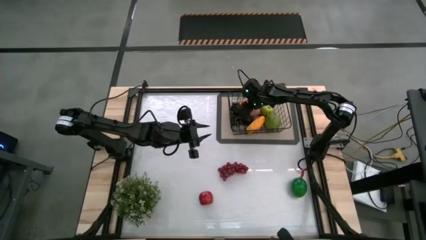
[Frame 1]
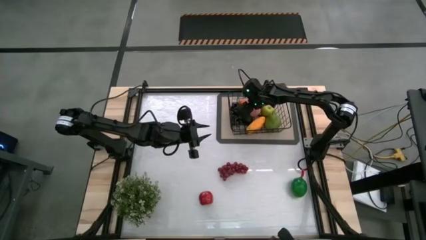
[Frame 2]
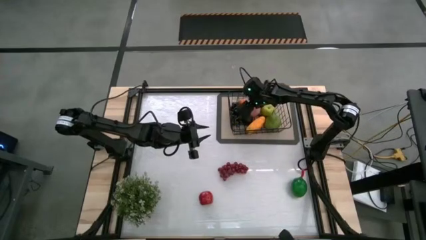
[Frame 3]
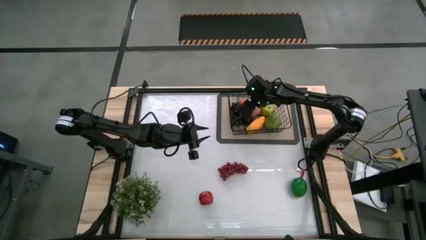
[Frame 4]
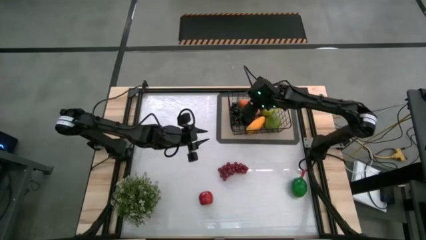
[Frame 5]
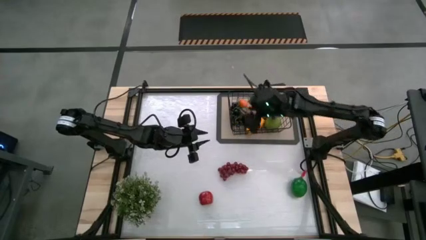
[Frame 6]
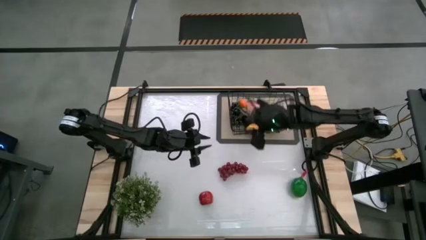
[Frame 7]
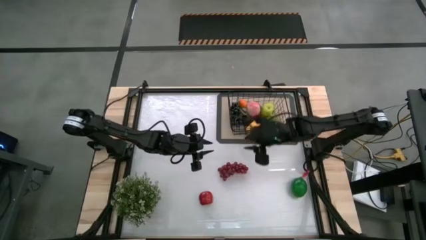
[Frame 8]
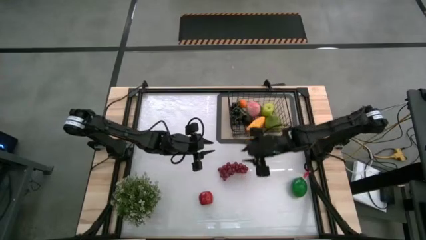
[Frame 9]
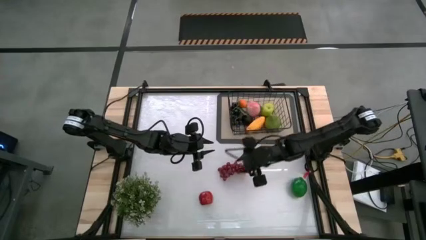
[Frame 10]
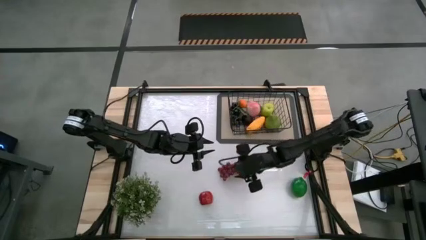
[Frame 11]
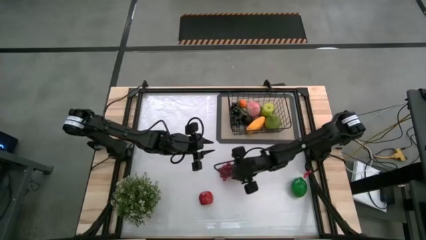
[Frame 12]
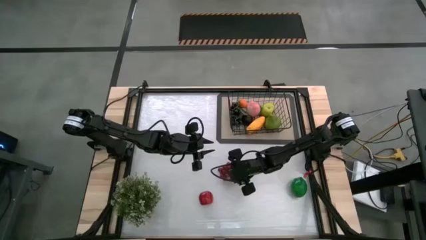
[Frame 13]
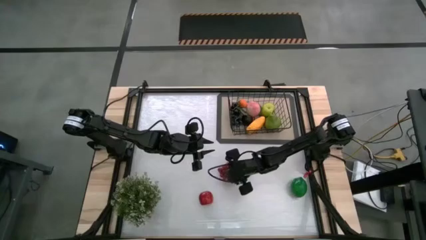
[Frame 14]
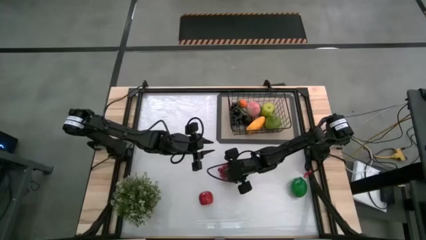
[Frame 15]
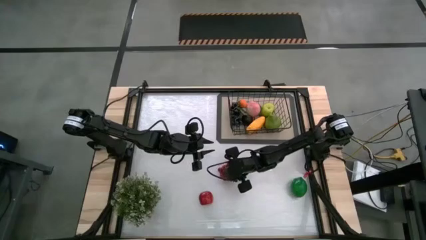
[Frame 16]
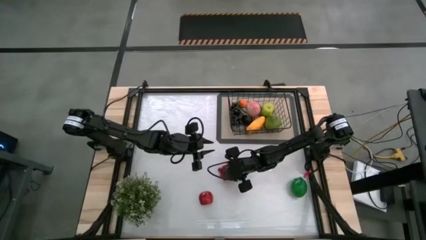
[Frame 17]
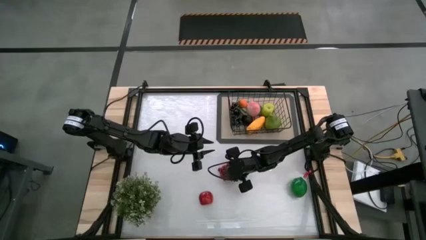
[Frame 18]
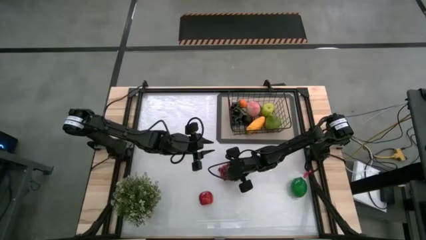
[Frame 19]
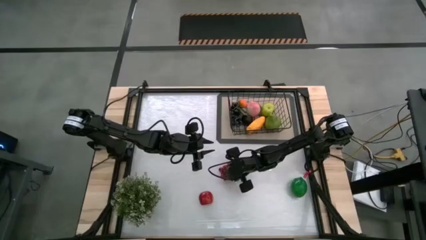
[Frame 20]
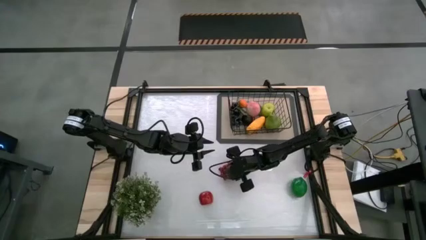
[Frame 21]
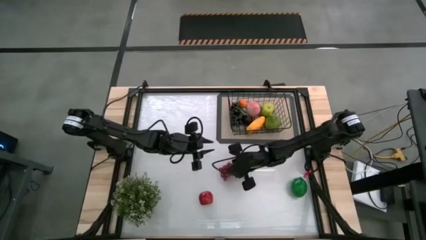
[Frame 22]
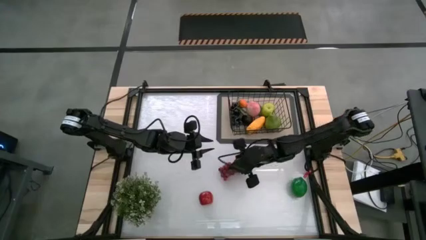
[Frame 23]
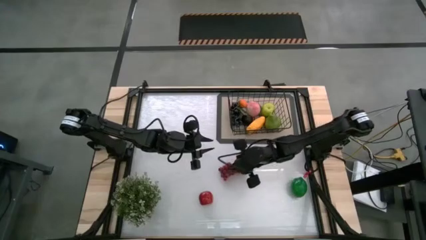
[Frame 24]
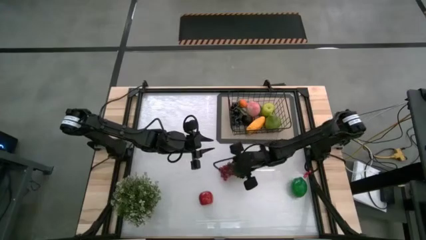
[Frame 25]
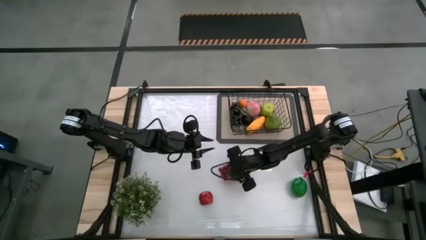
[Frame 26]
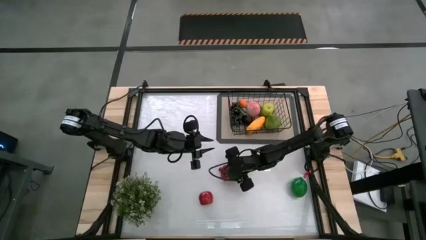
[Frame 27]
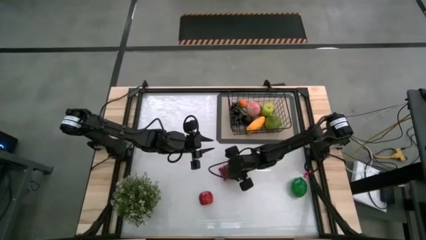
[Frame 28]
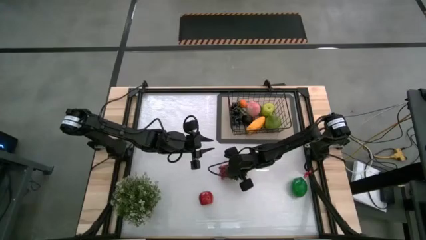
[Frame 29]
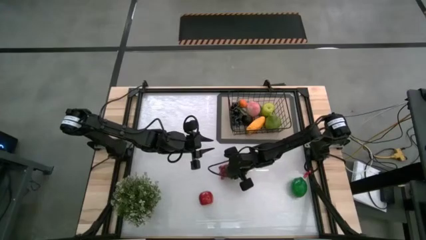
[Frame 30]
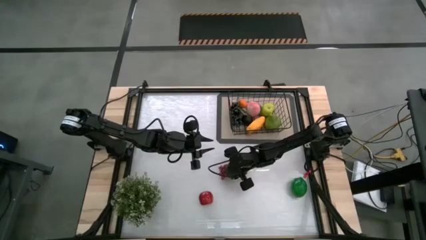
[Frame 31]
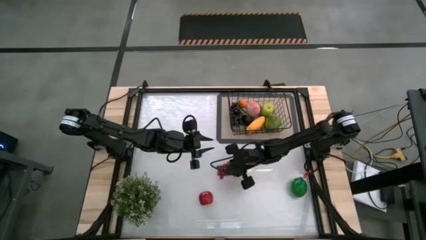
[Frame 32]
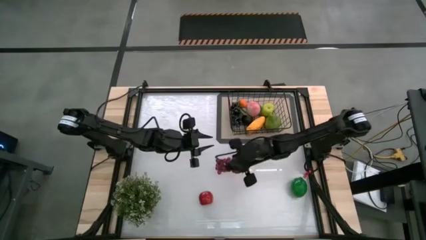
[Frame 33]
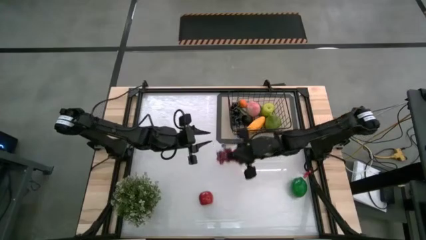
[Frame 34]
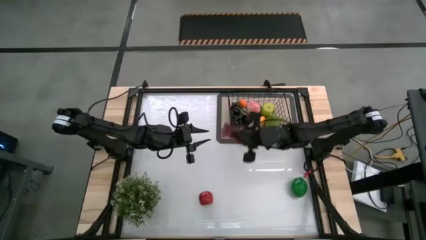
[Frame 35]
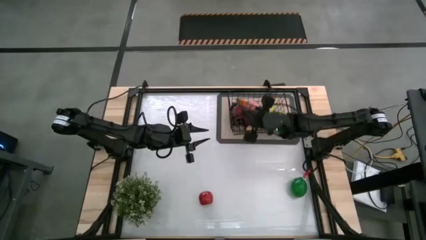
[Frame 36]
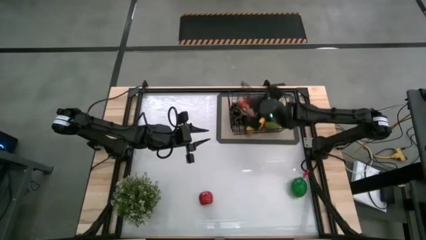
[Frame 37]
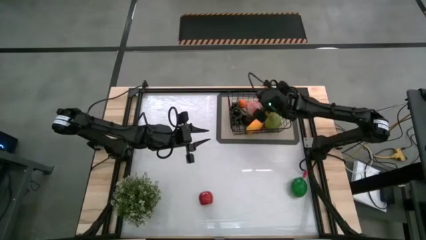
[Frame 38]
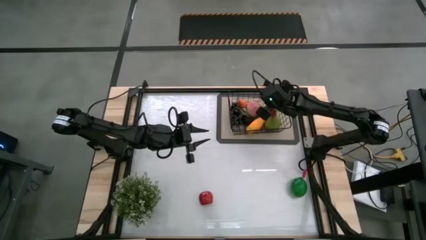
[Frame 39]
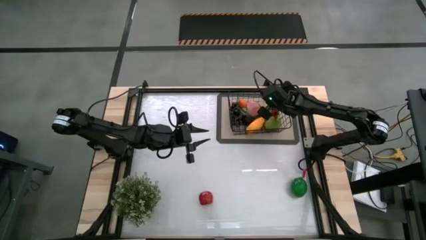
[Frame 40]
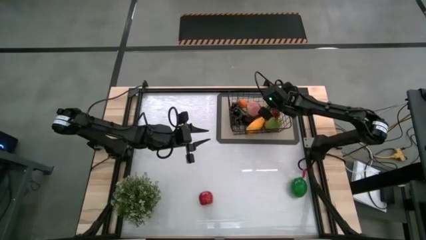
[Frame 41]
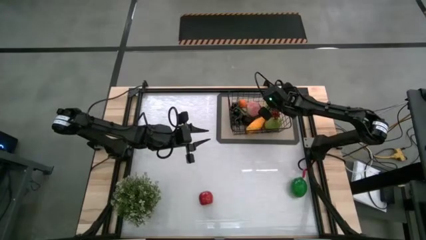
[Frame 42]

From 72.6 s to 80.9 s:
Task: Build produce basket
Put the red grapes into the black basket

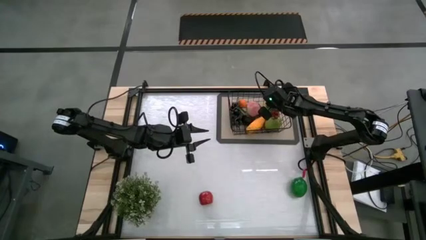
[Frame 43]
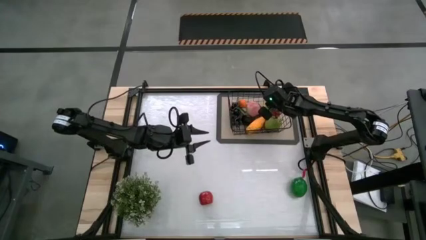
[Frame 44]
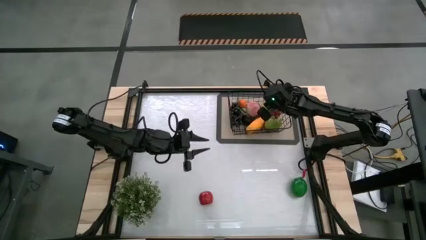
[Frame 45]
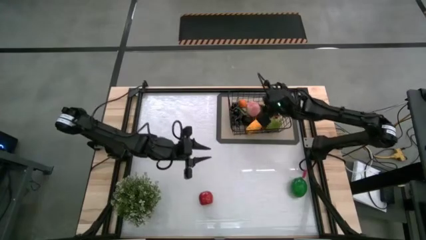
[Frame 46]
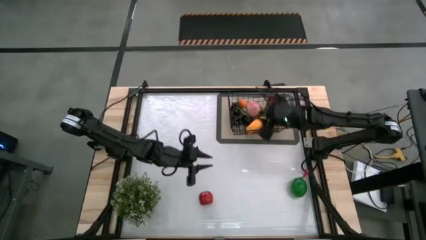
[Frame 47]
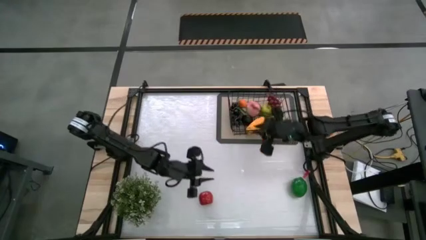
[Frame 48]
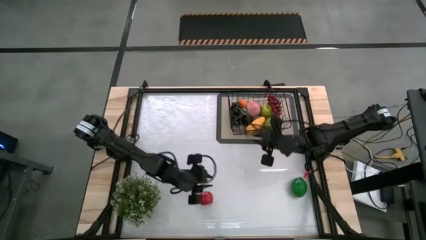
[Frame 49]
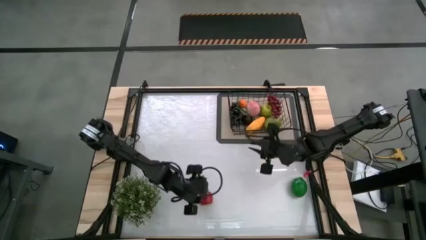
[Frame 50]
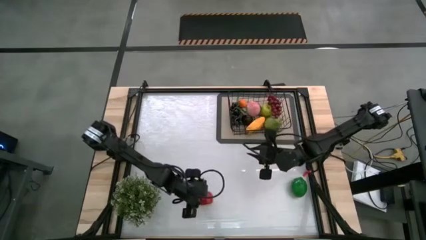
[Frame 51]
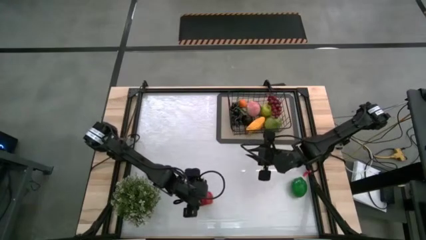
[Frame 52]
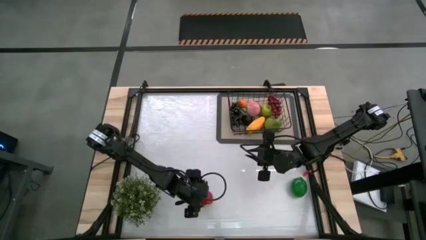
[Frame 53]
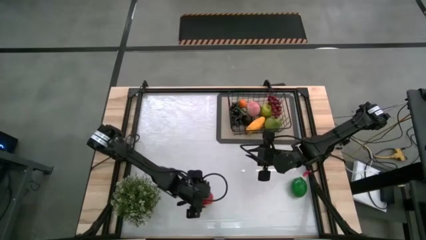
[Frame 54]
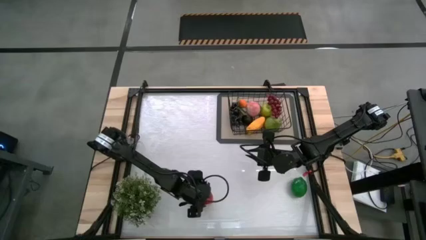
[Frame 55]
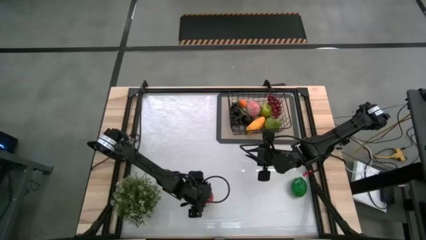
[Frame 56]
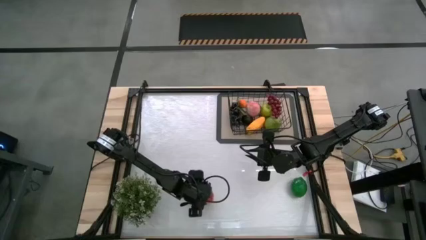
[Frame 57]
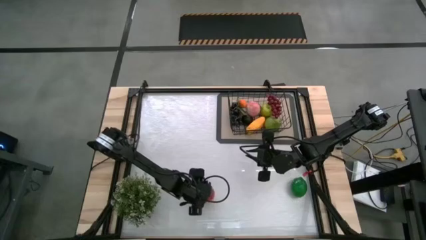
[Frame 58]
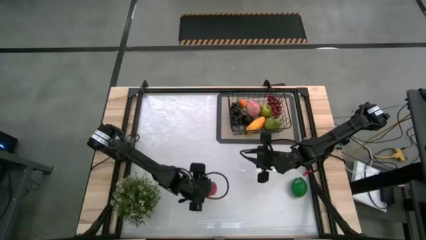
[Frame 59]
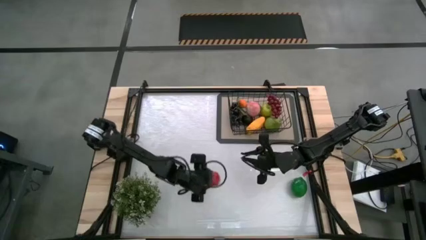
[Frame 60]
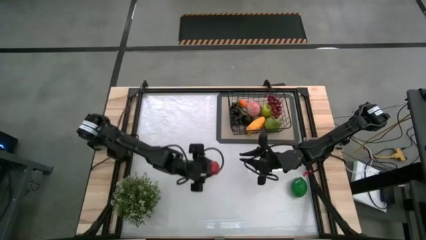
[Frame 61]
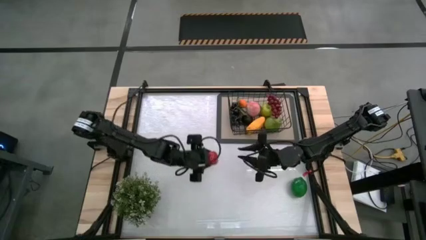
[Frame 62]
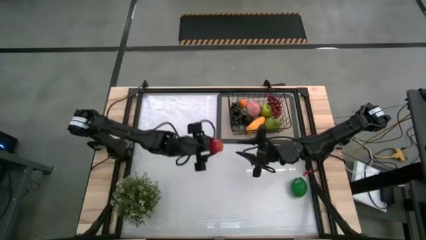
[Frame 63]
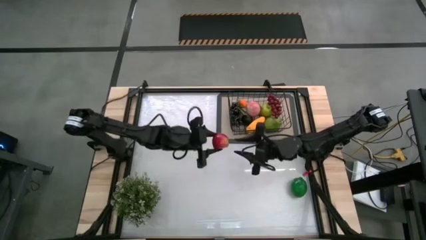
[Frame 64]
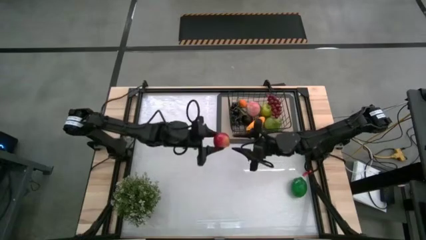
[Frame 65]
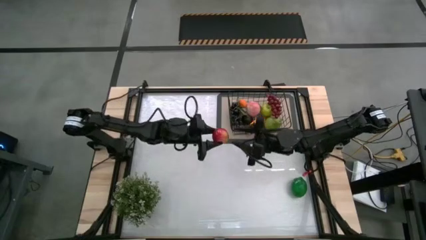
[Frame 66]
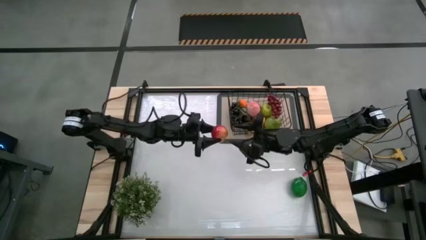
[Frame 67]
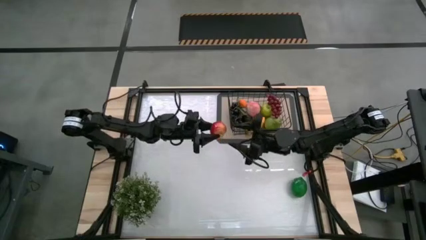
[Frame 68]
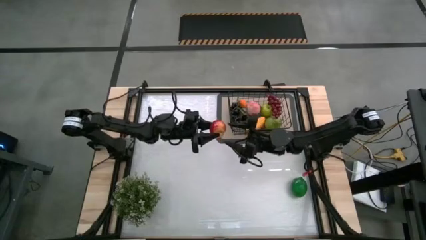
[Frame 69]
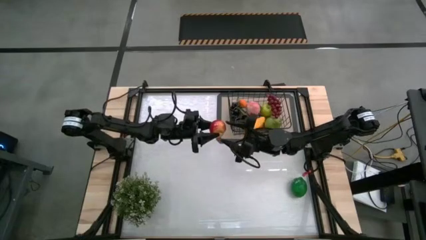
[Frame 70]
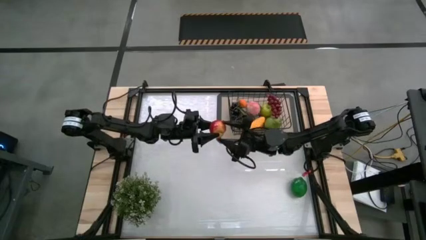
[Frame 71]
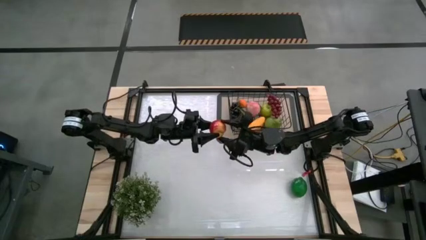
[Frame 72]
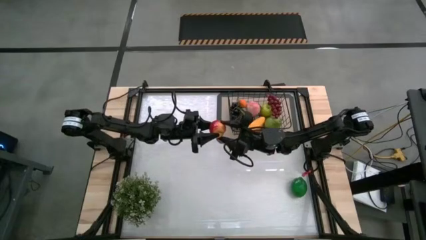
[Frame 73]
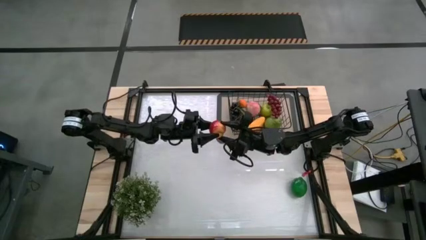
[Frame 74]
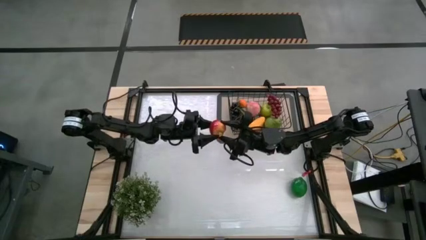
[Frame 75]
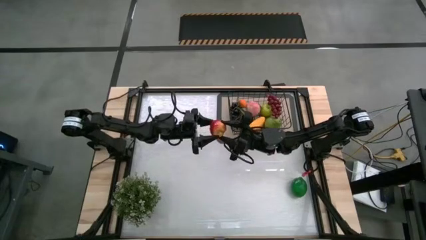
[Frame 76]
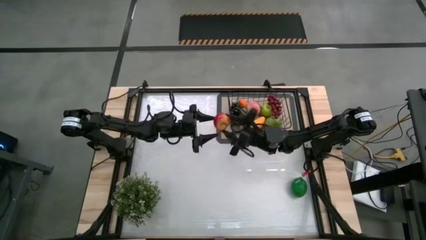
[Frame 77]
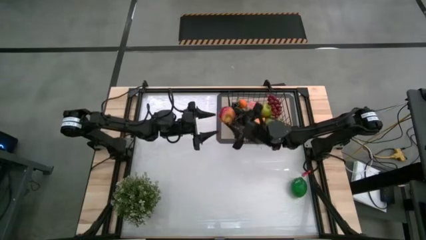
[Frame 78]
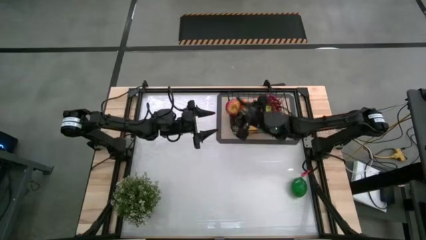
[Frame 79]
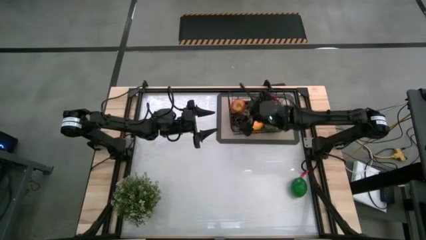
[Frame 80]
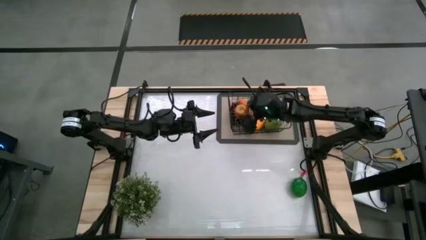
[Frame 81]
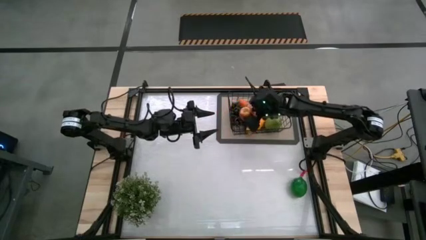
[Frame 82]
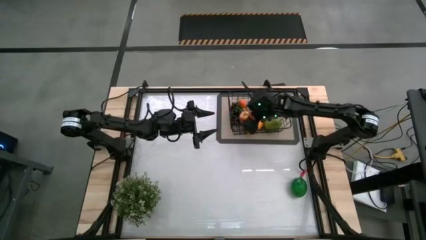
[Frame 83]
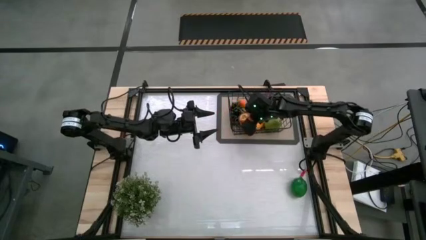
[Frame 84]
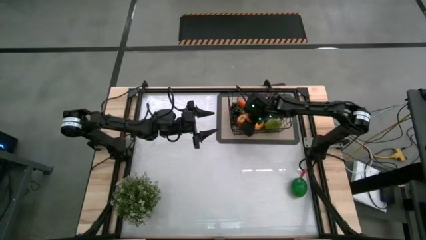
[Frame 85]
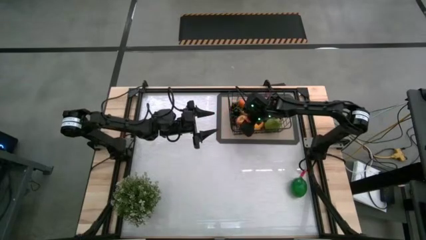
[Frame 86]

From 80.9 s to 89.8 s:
Put the red apple into the black basket
